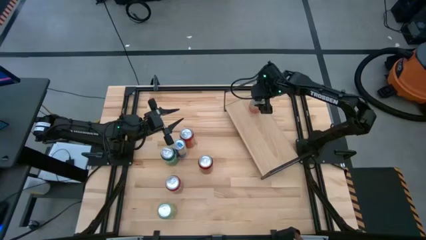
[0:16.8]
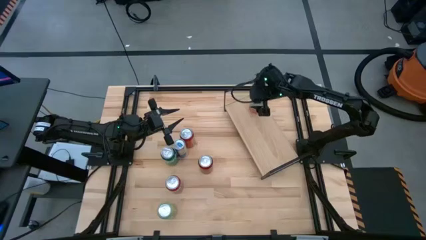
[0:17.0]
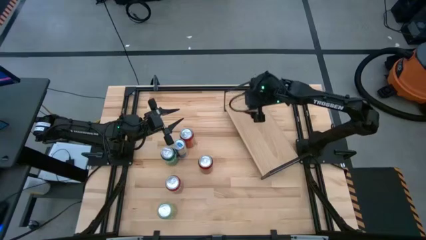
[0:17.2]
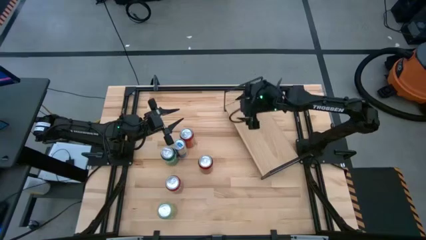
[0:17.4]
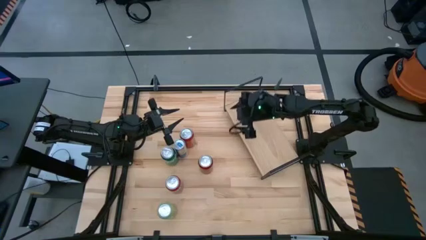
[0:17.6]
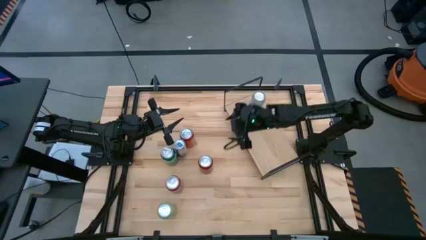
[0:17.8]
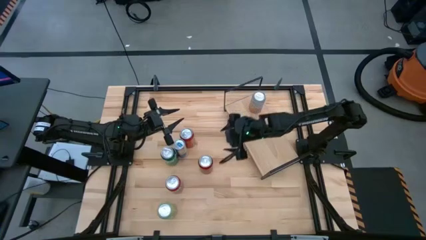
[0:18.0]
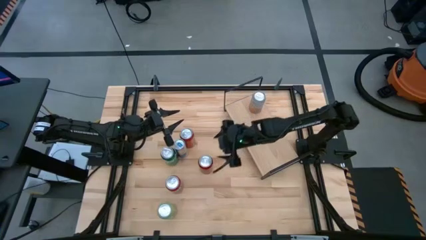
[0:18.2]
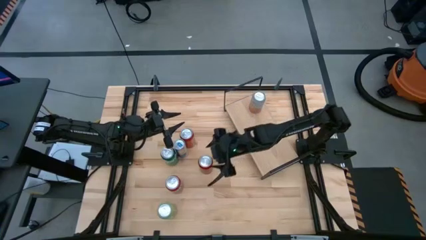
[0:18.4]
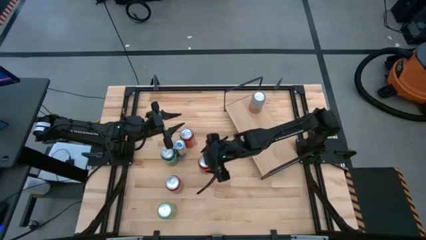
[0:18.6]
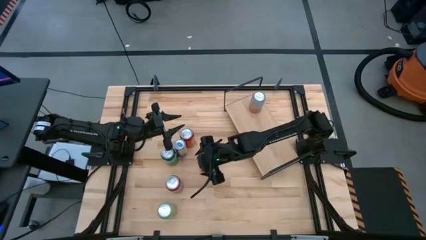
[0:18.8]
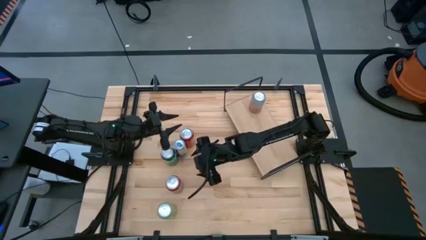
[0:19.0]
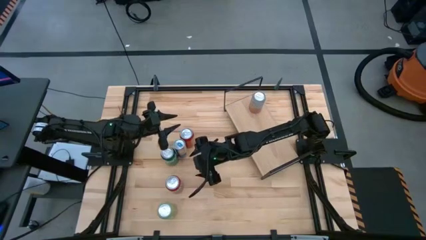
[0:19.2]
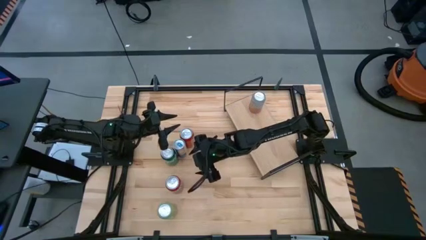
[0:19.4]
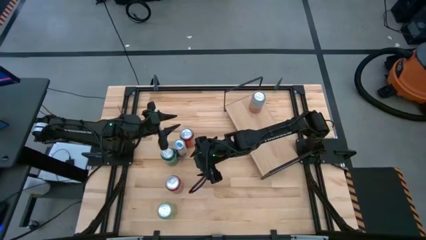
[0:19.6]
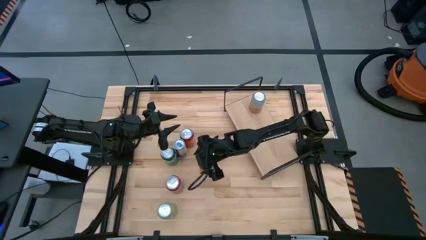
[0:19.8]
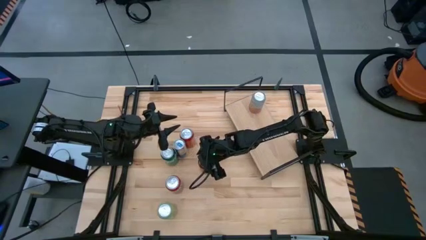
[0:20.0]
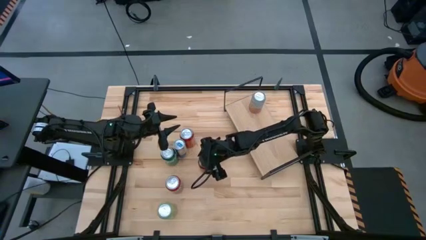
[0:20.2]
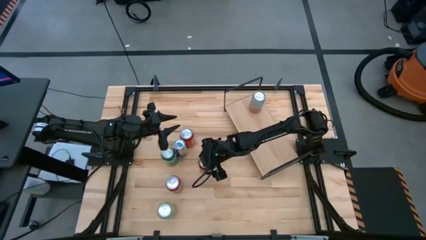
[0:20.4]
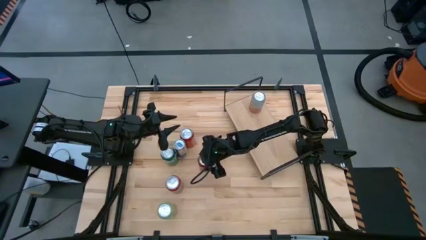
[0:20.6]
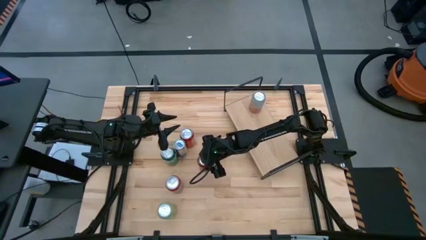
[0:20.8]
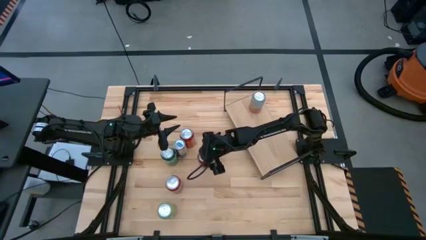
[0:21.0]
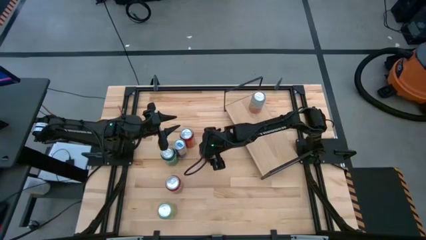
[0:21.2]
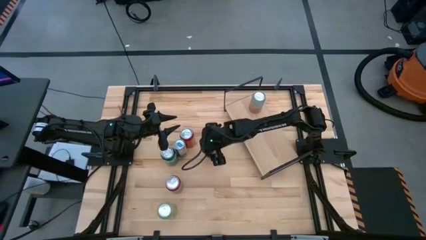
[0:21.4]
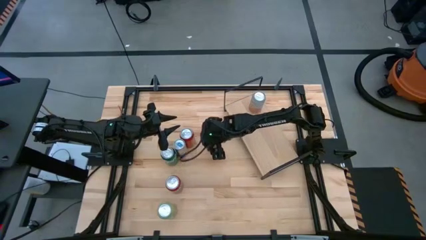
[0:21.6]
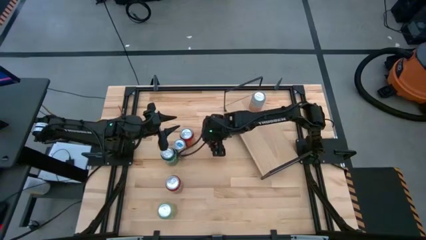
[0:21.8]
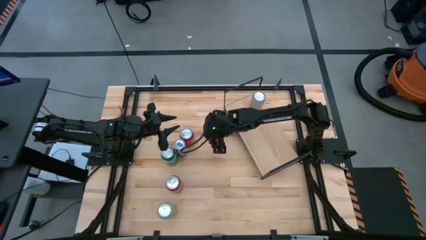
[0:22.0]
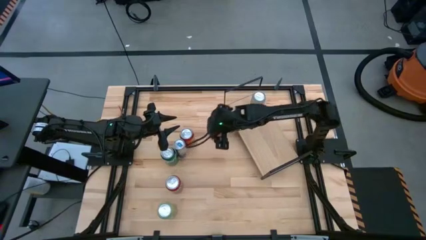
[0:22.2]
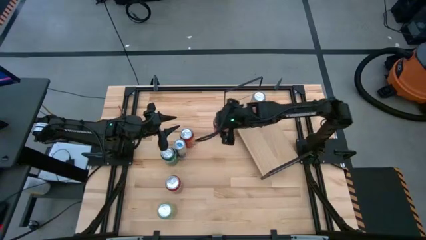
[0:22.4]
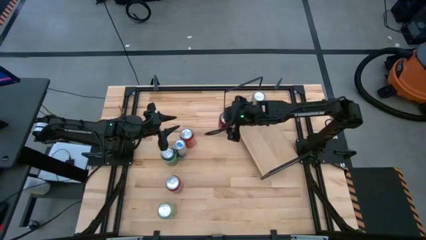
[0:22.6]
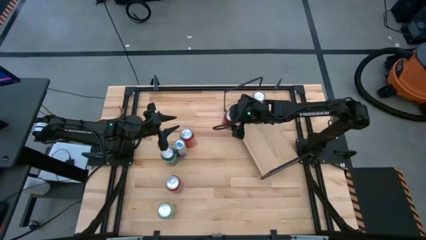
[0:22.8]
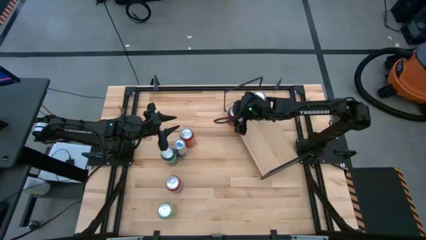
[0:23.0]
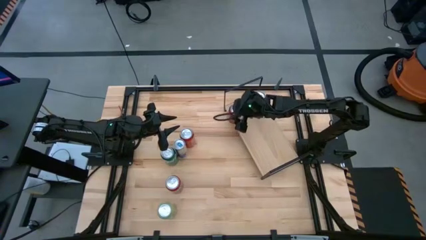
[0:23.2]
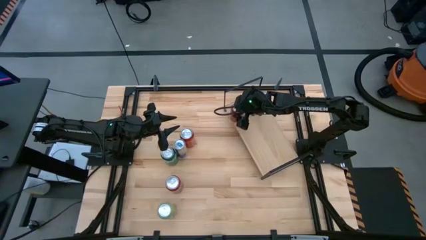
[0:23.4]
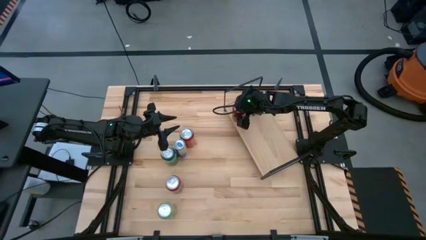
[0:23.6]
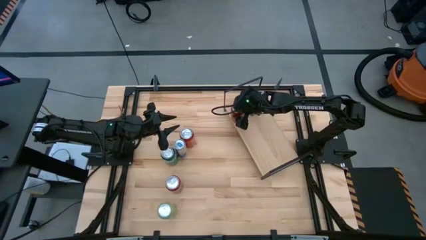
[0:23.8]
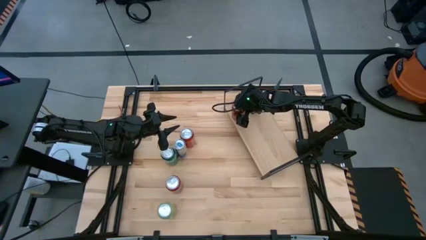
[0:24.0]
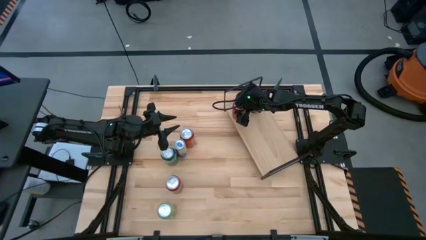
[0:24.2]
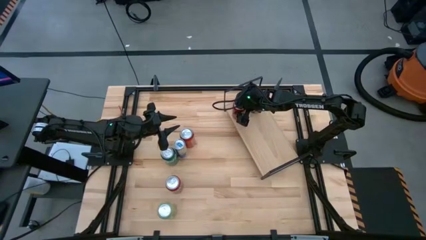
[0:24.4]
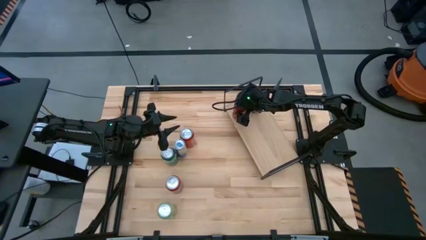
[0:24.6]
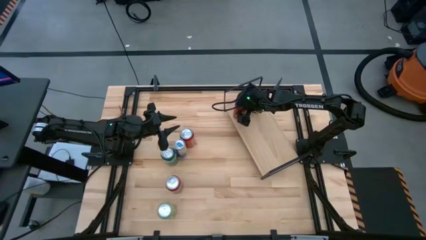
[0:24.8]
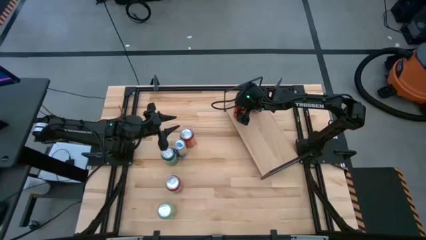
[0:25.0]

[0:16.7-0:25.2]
Task: Place canned beverage on shelf
Put the red soda can on the shelf, aligned with the other white-and-orange soda can
